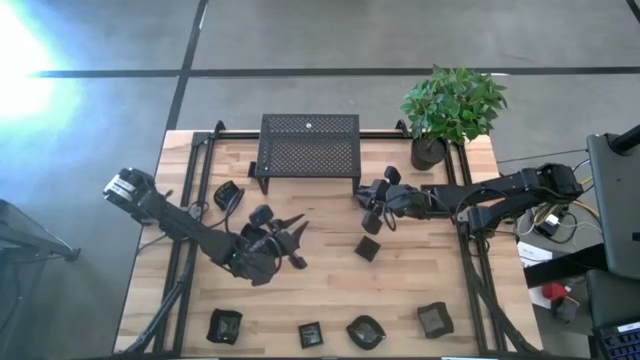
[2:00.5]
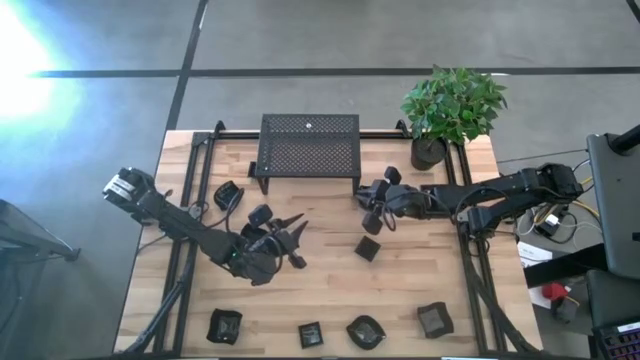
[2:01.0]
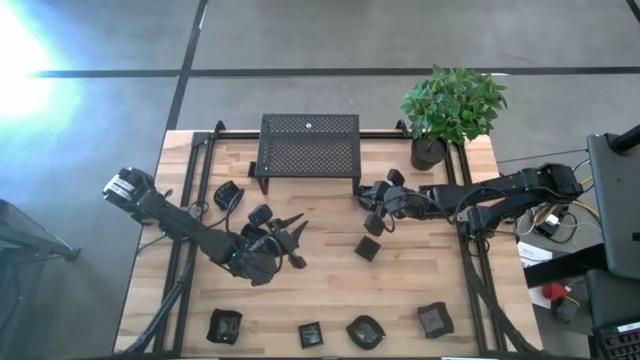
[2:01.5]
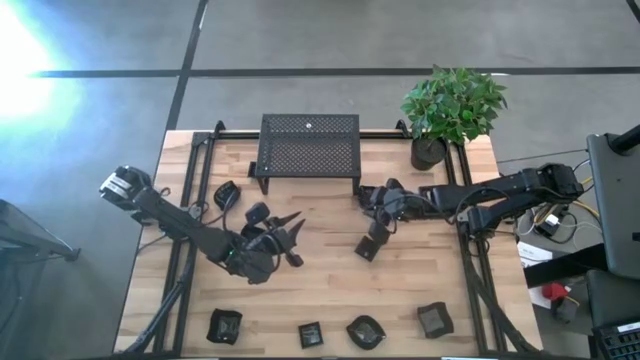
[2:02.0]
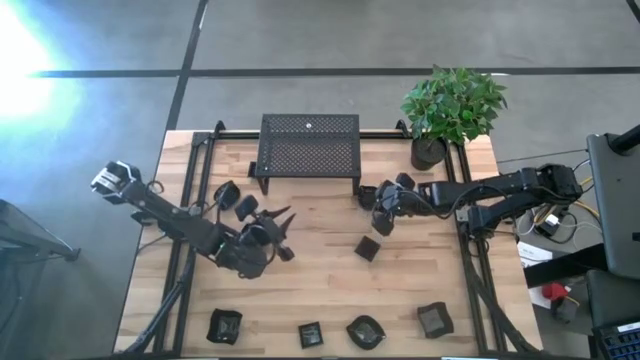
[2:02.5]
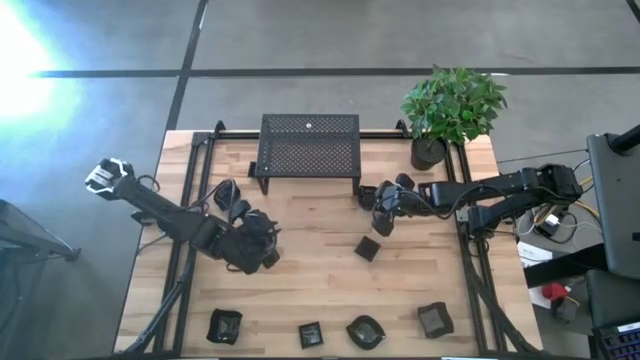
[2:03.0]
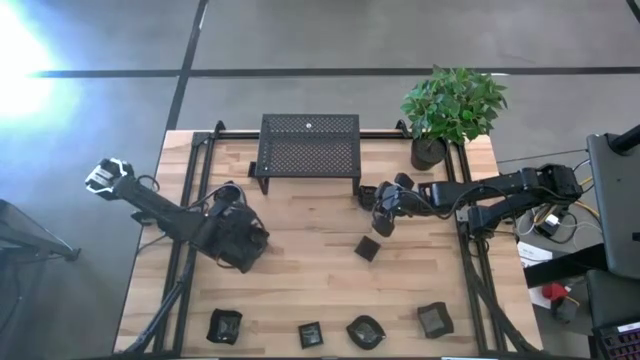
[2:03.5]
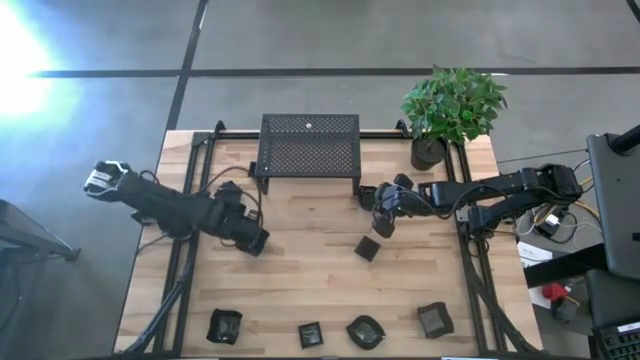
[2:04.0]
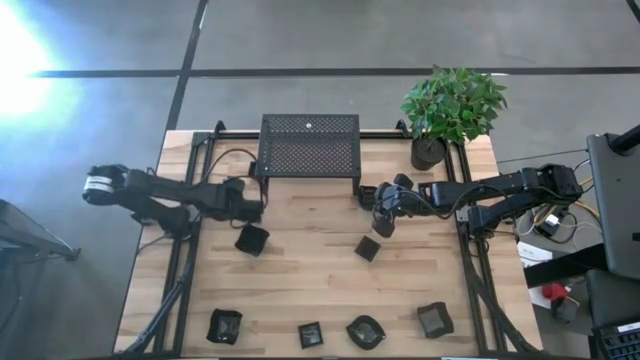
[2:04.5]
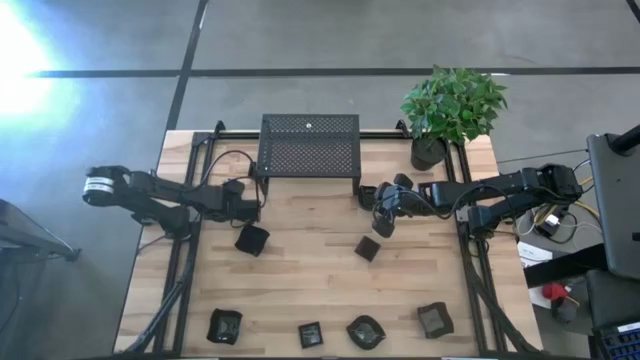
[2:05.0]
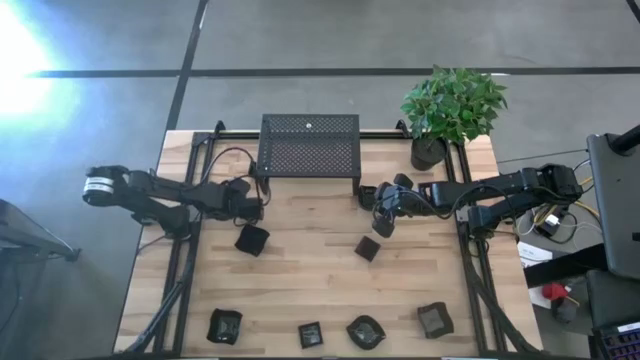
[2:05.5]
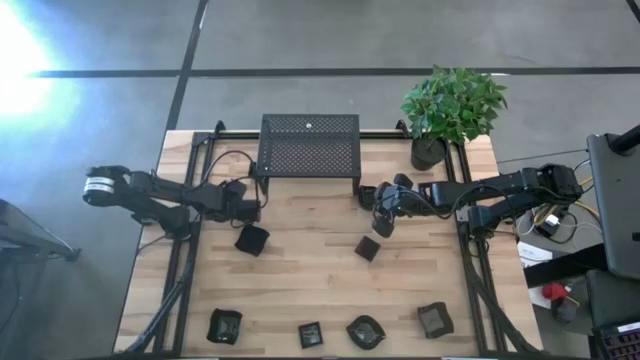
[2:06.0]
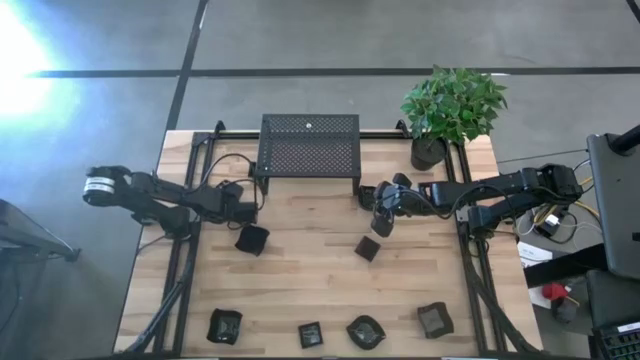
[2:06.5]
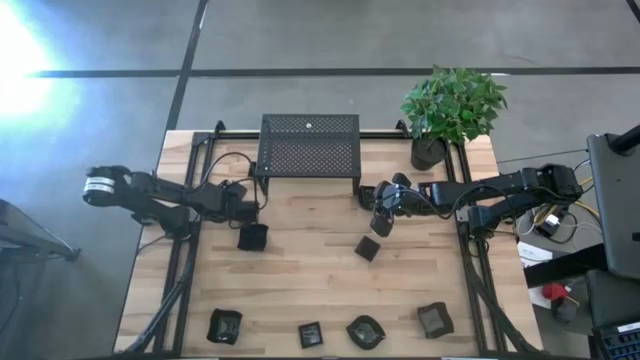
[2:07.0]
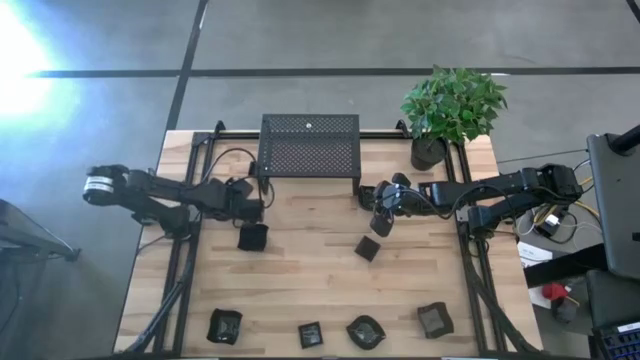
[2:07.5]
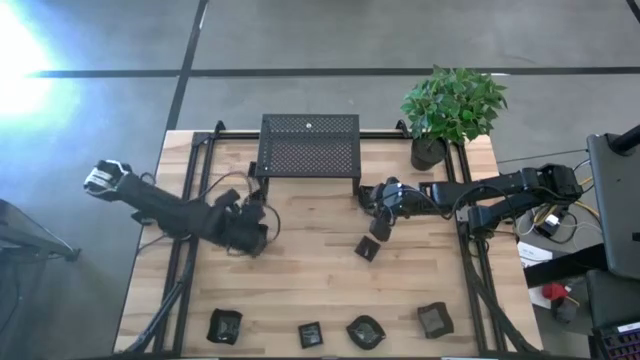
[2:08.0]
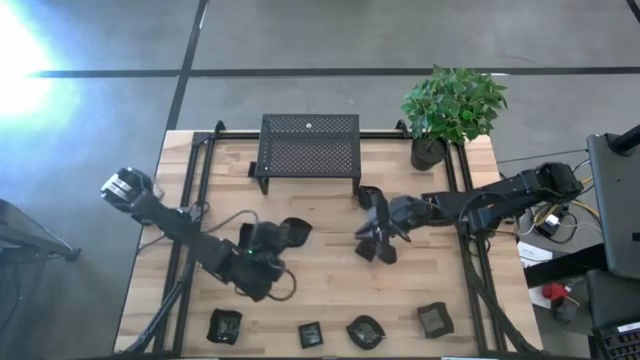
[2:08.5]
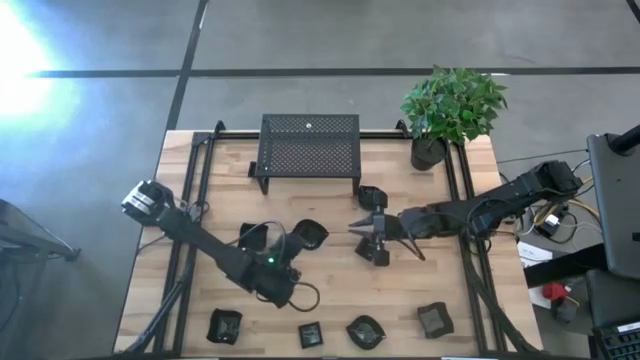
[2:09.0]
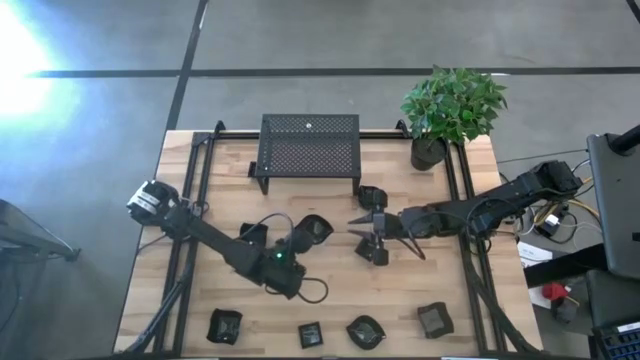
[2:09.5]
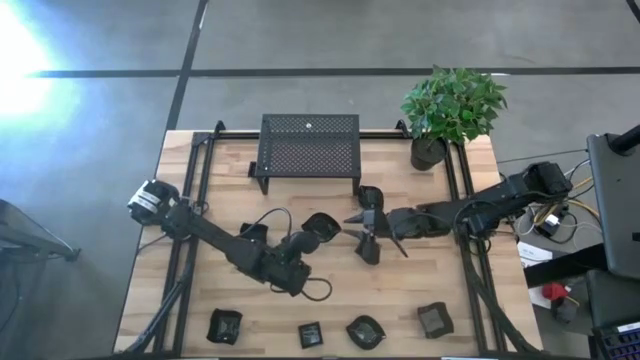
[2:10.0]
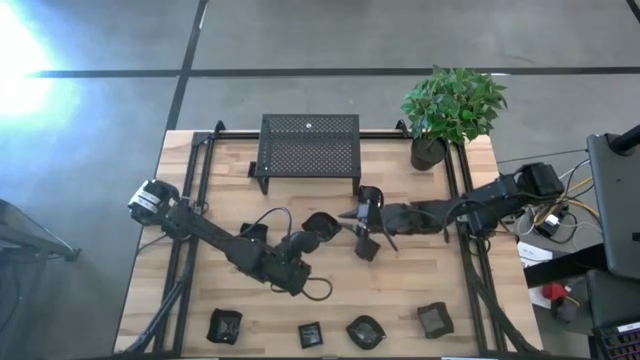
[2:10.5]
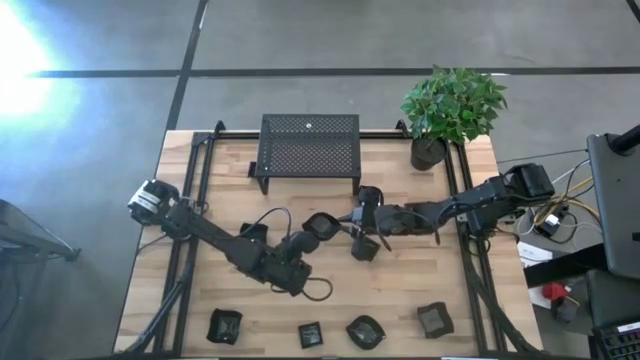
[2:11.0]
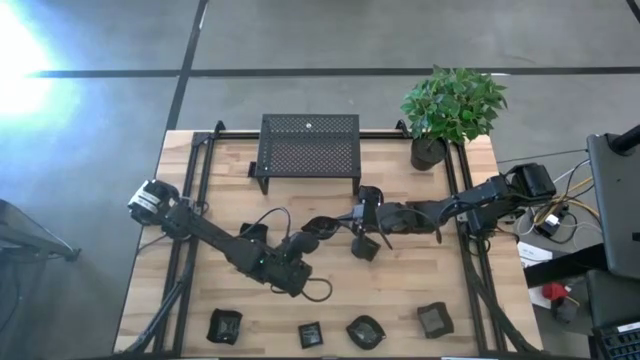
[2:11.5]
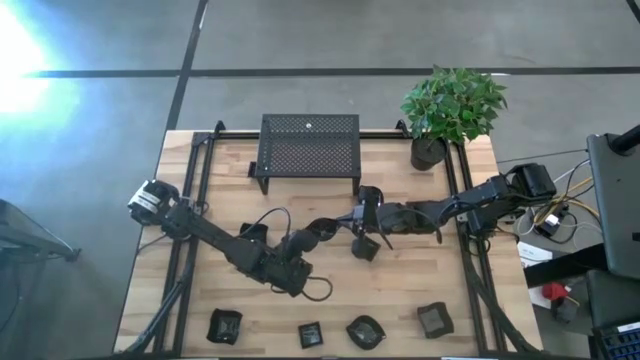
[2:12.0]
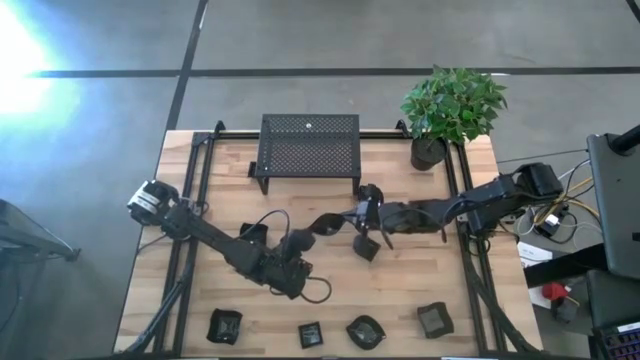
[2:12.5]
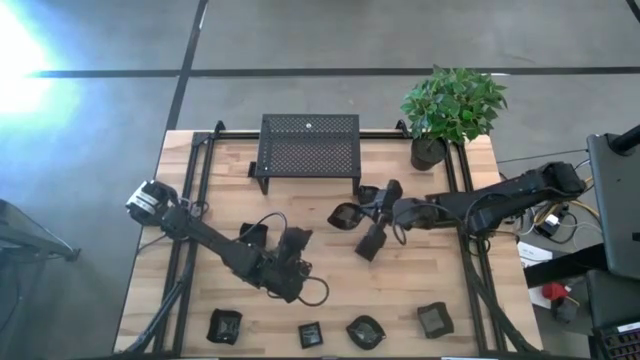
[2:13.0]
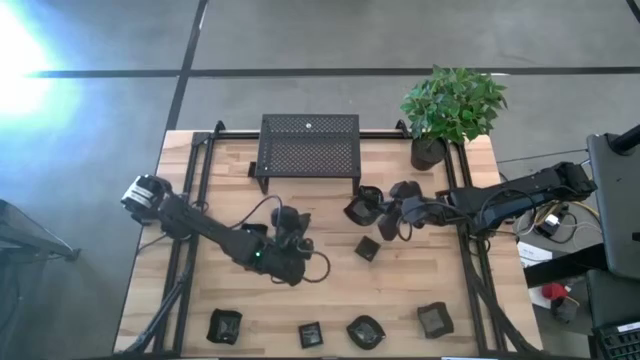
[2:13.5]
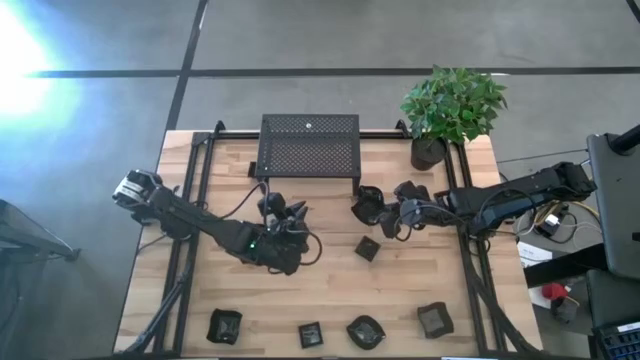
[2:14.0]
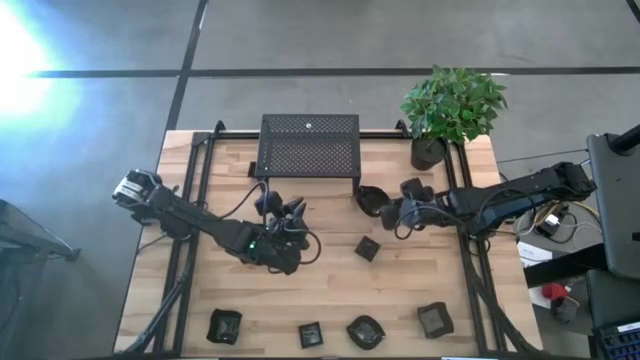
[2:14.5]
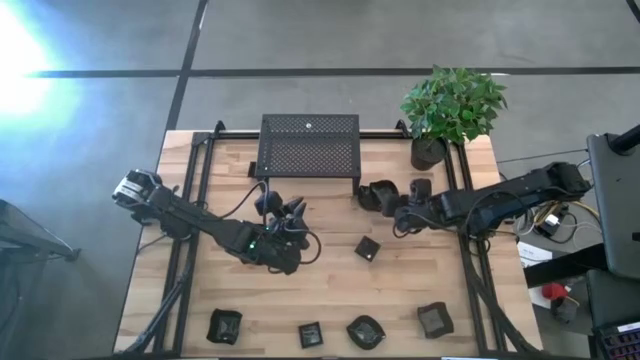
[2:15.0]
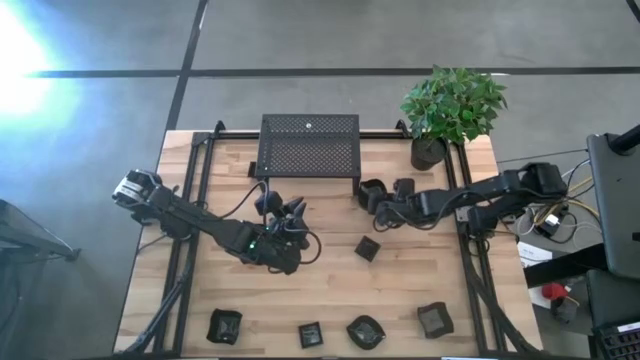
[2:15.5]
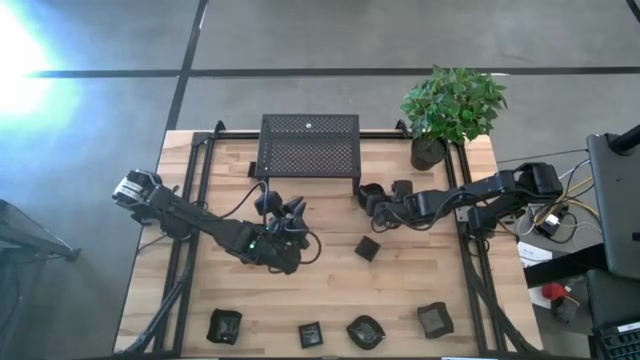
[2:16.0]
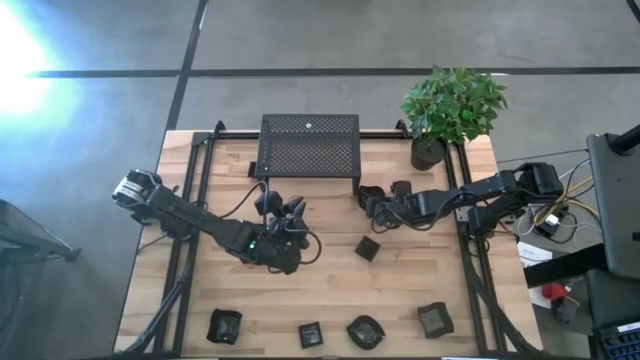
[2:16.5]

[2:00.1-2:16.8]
Task: Pick & Place Mini shaped plates
Stack the black leaf shaped plate on top of the other black leaf shaped plate

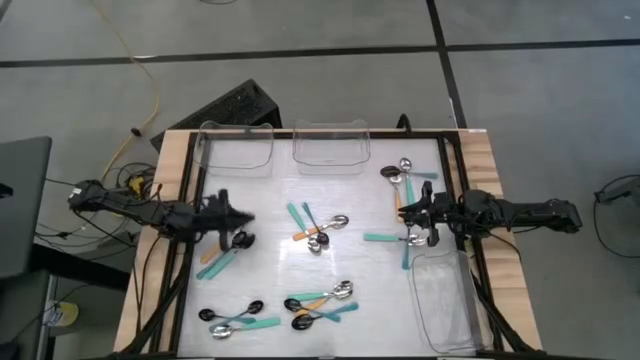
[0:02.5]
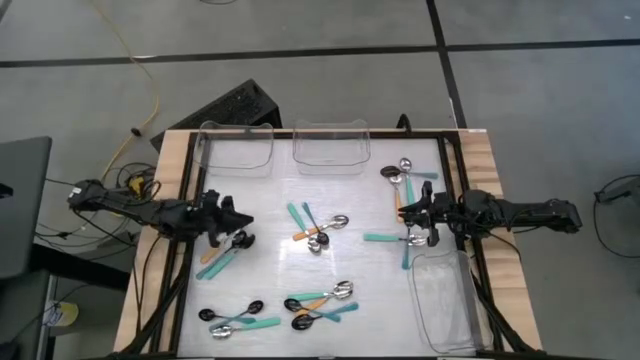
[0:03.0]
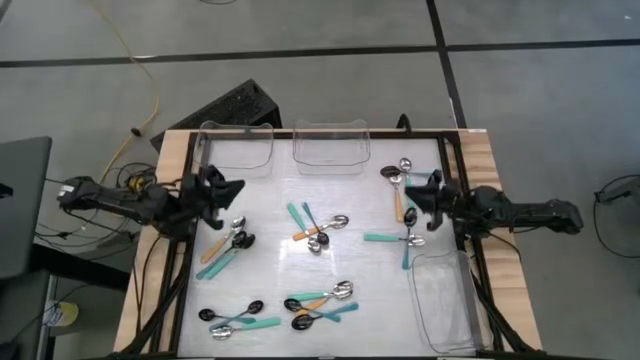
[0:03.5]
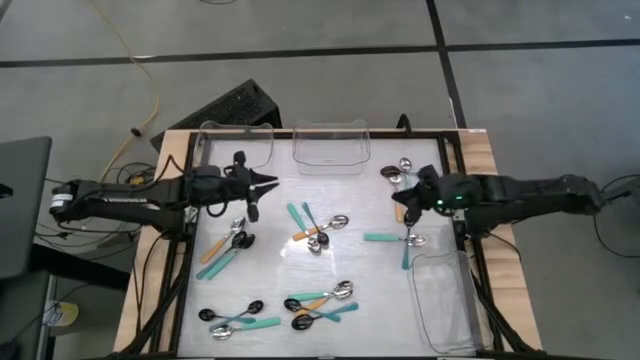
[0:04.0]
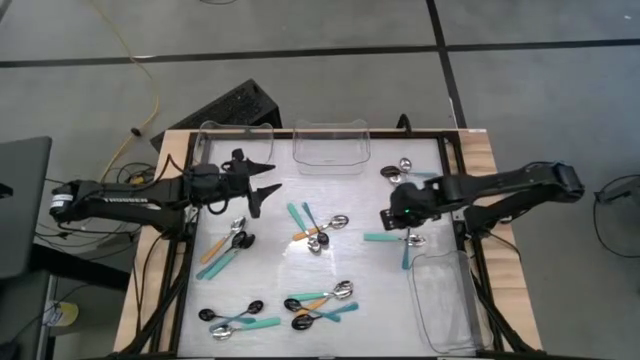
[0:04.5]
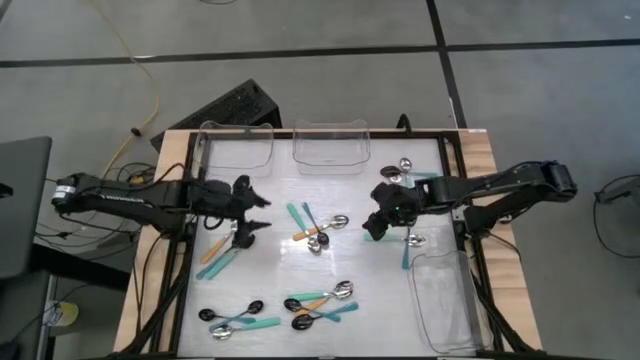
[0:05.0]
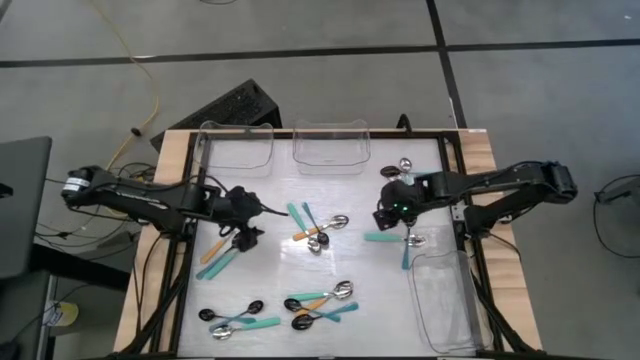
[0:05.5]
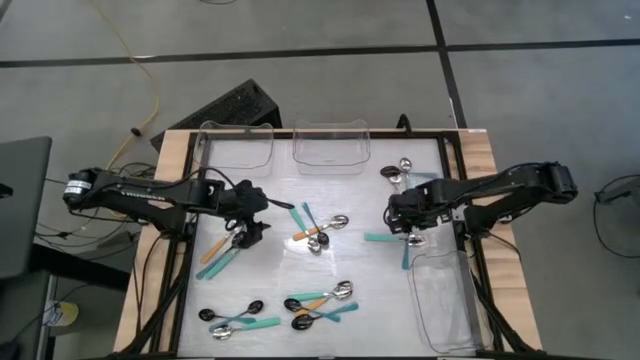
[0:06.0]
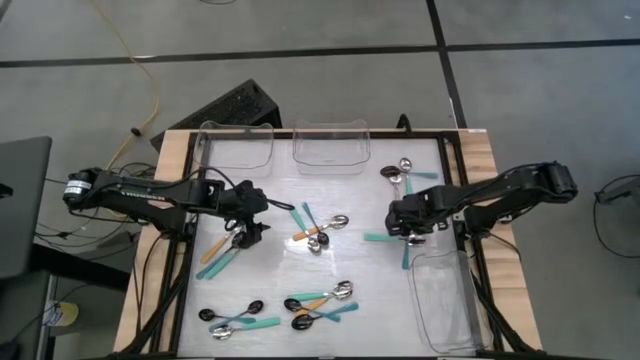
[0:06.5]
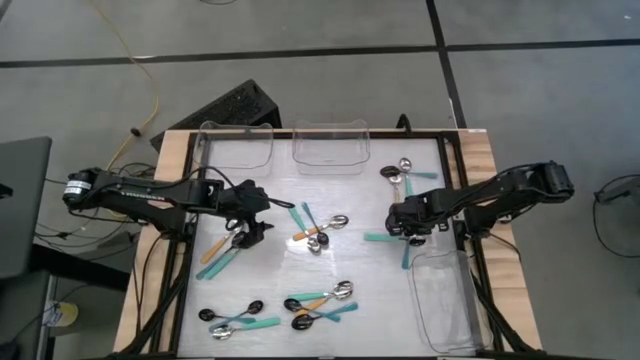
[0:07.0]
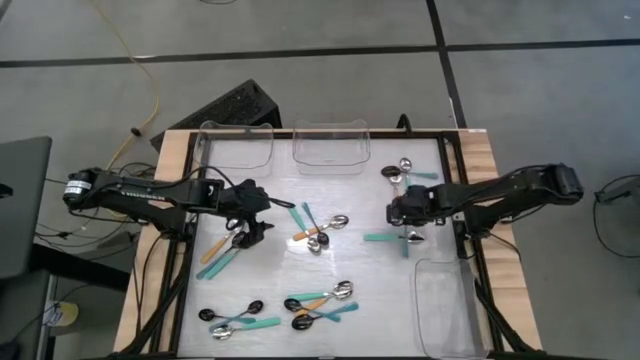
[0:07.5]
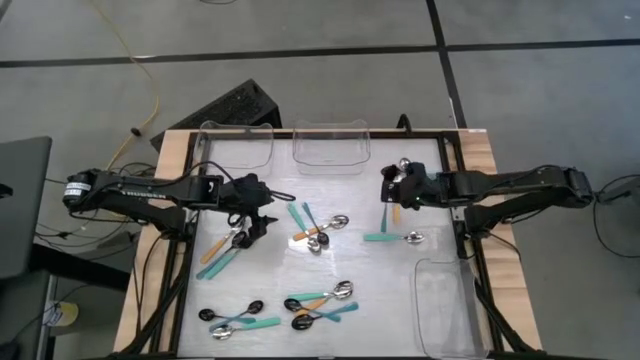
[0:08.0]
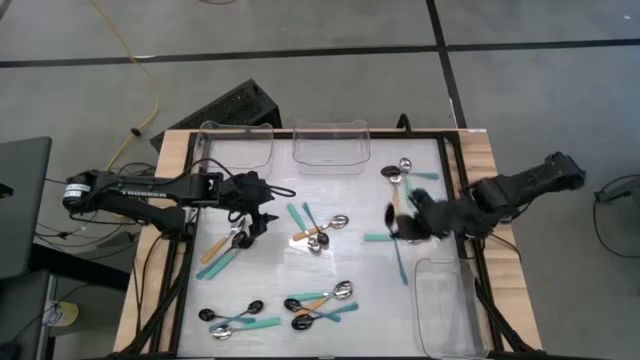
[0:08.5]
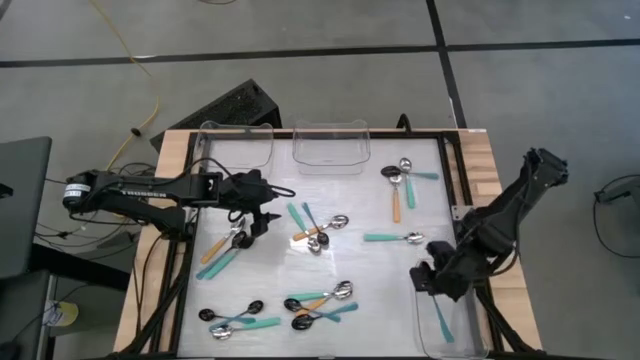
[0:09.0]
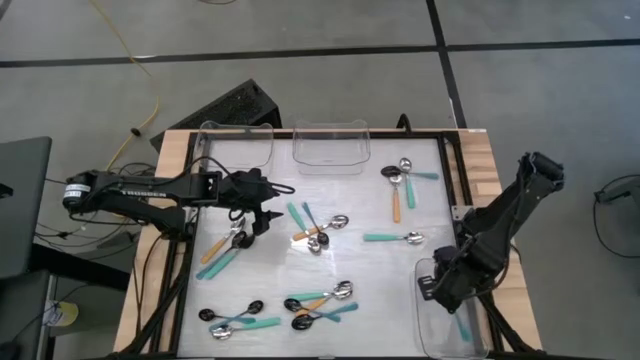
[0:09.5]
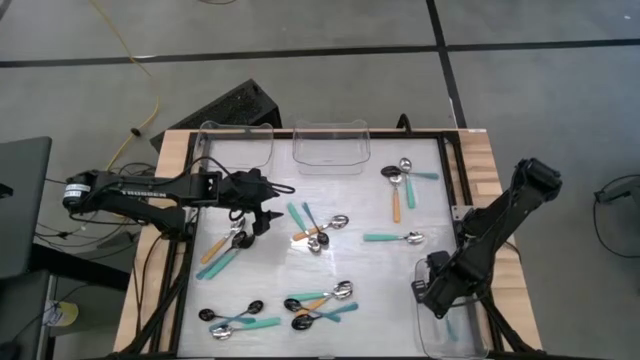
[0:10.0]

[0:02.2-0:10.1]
Task: Sort silverware by color (type)
Put the blue spoon into the bottom transparent bin
